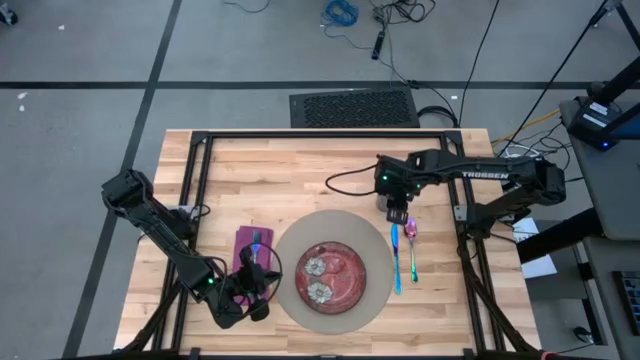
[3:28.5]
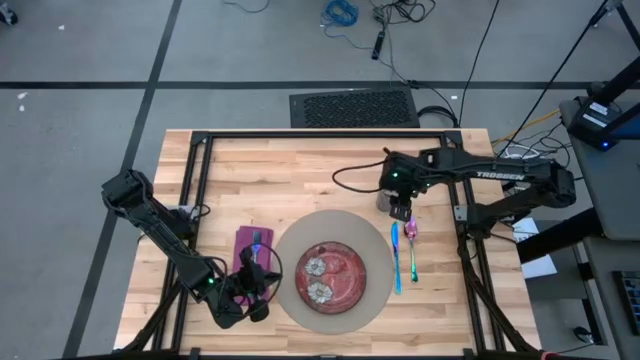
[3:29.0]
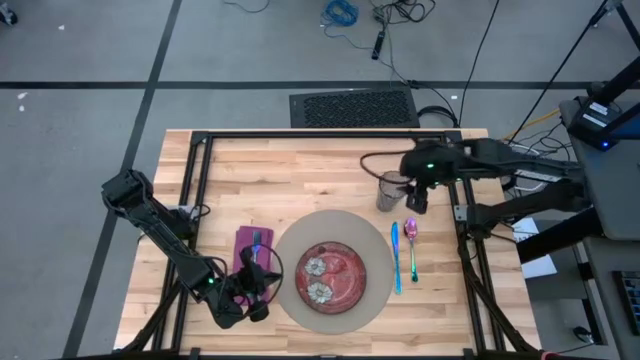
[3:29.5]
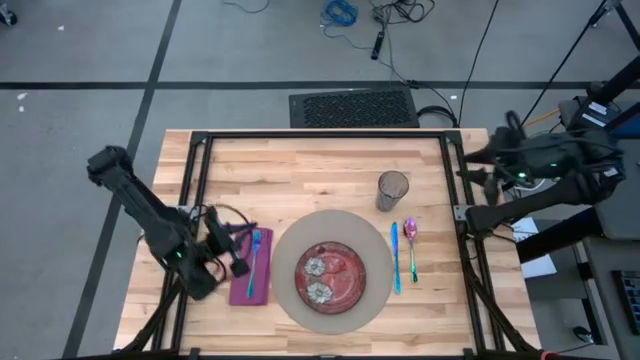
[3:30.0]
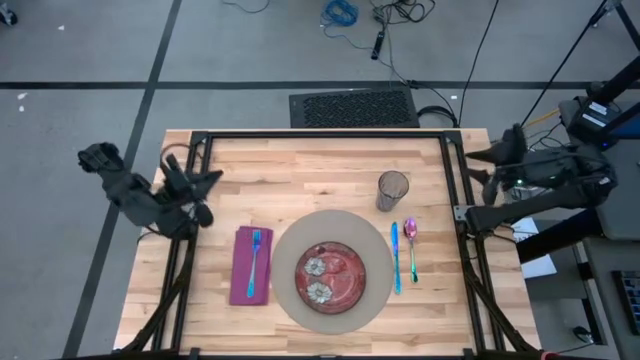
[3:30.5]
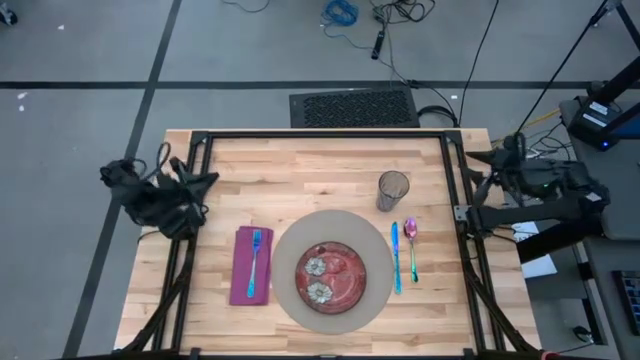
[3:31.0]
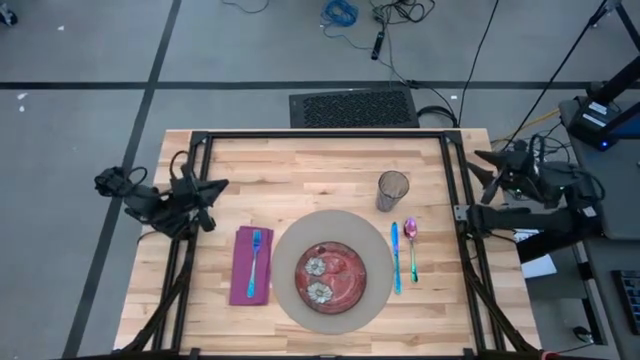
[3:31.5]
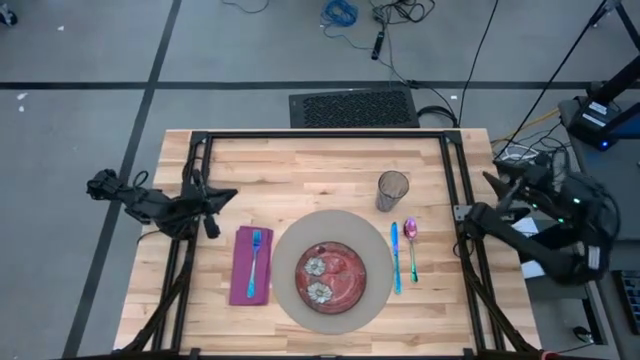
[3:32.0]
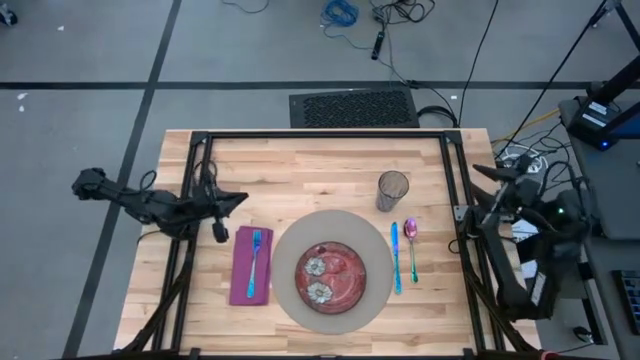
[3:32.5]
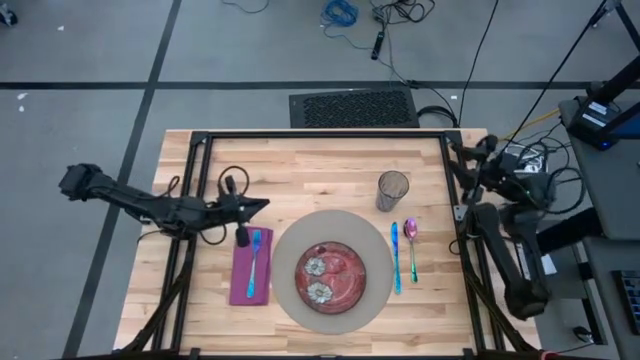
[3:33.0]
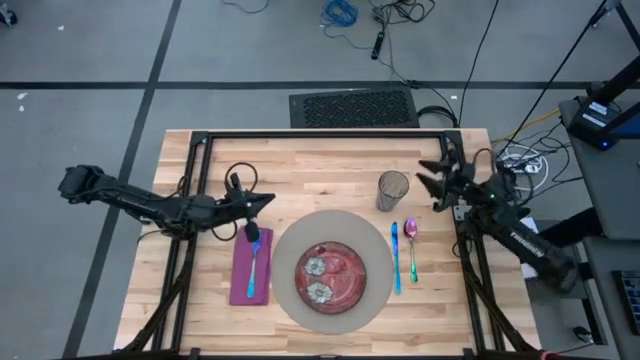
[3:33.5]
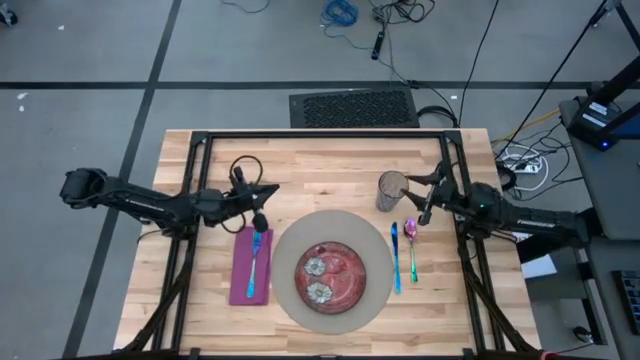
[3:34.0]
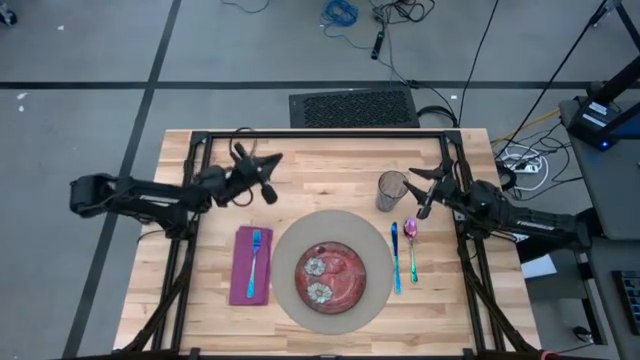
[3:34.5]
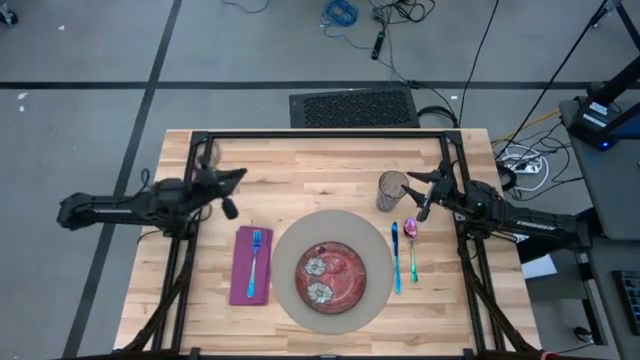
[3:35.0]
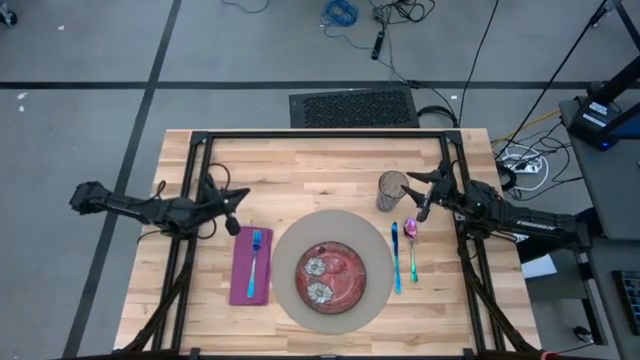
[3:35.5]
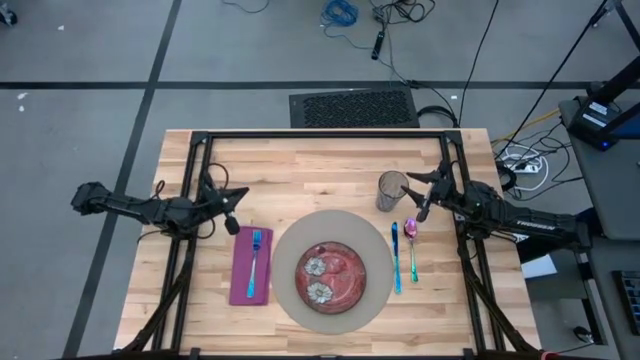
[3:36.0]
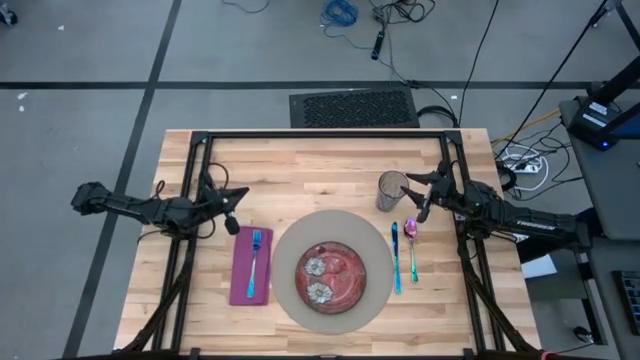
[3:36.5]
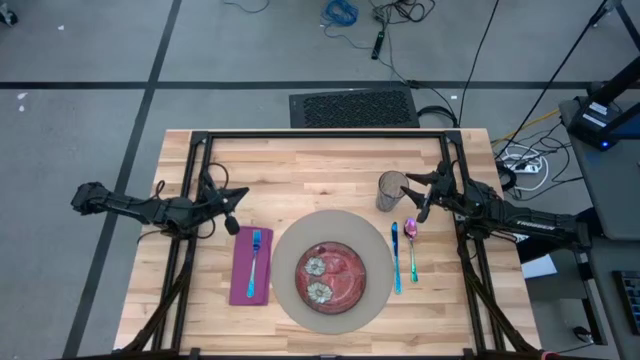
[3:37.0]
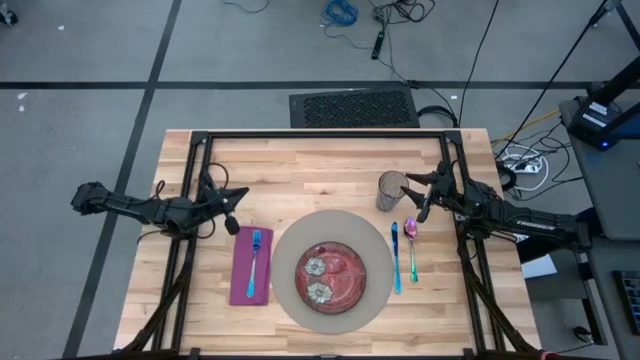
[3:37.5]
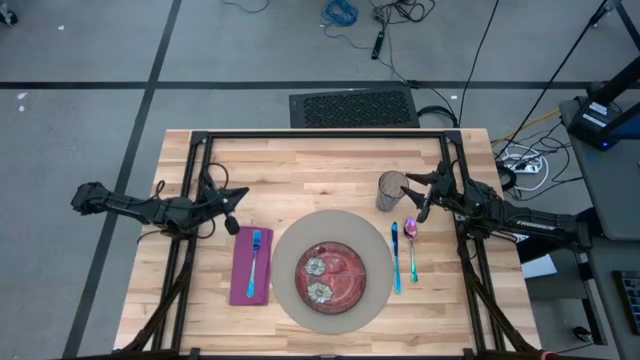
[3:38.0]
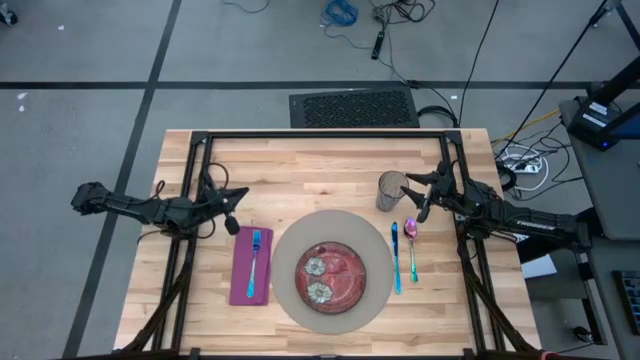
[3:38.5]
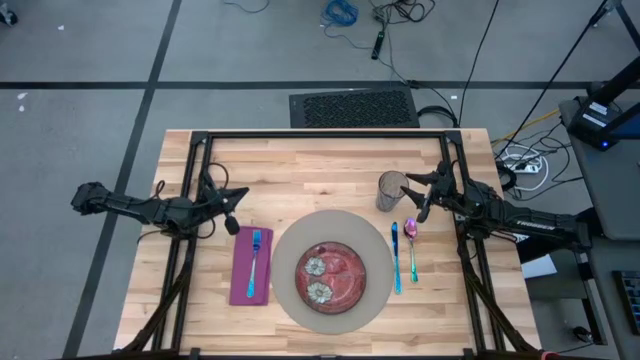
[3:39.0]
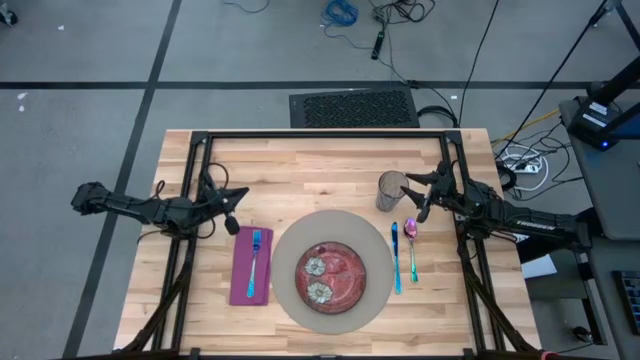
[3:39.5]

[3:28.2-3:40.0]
Task: Set table place
Return to Home Position

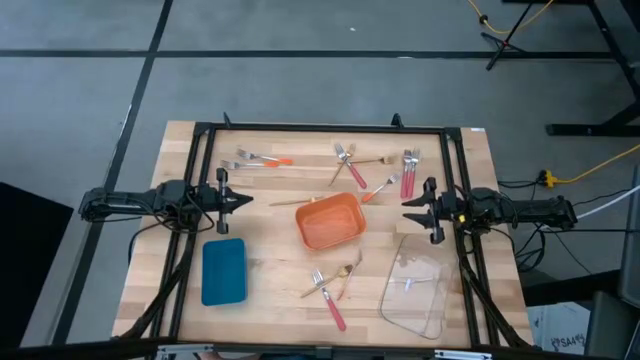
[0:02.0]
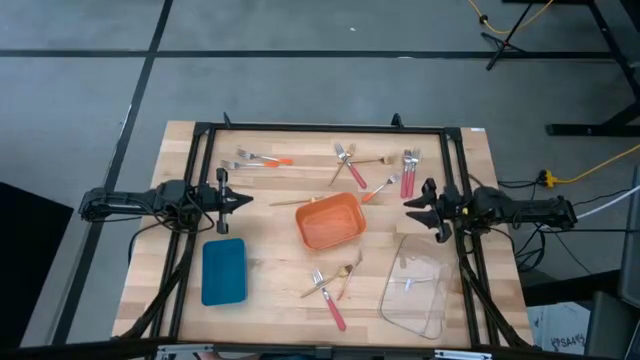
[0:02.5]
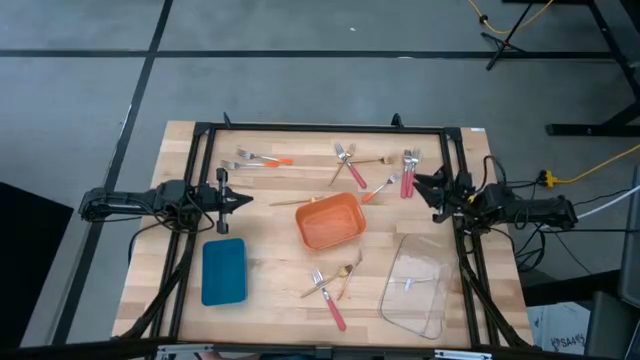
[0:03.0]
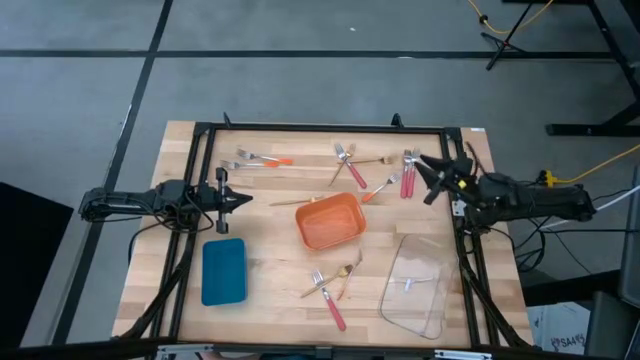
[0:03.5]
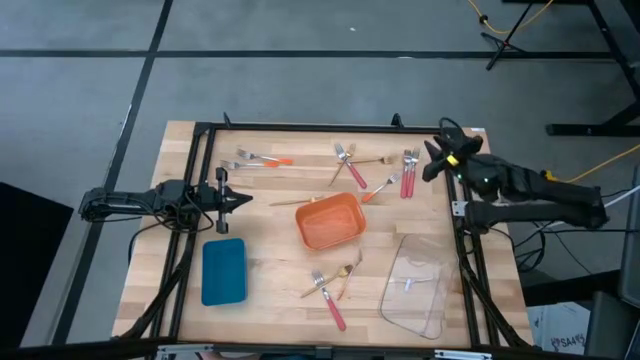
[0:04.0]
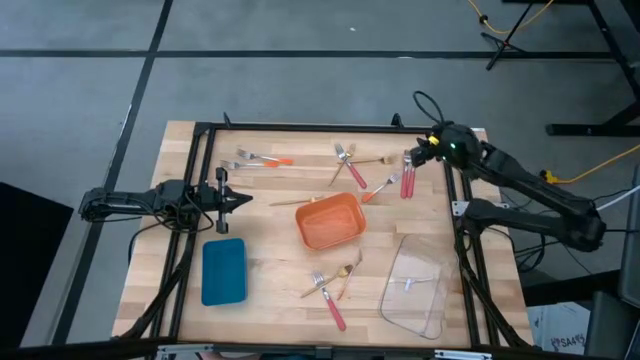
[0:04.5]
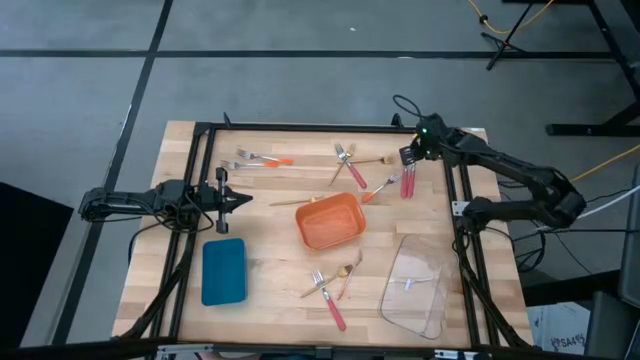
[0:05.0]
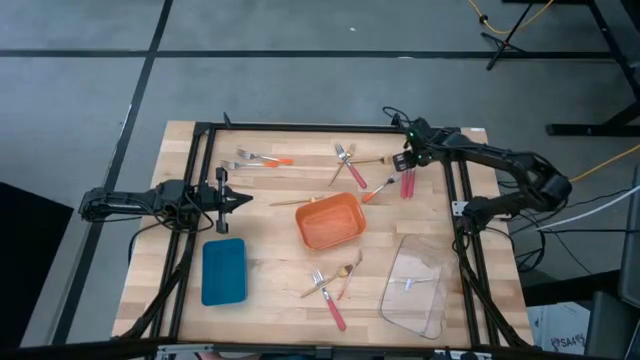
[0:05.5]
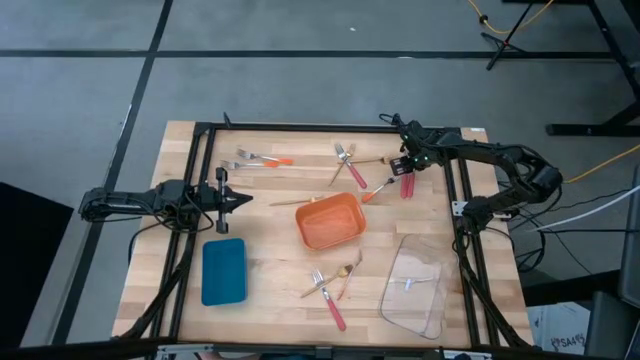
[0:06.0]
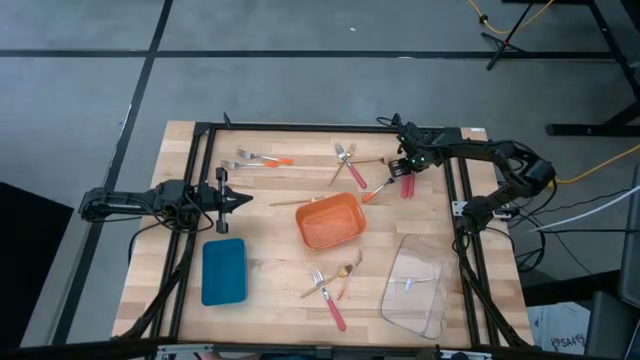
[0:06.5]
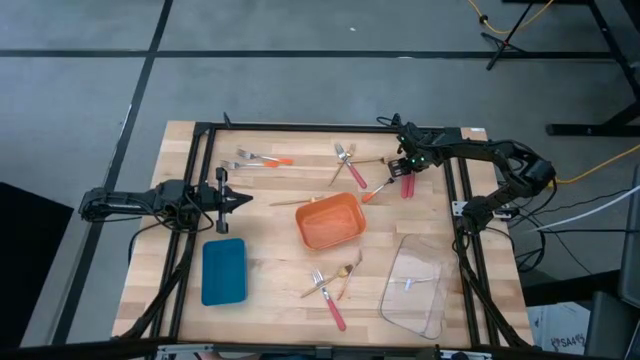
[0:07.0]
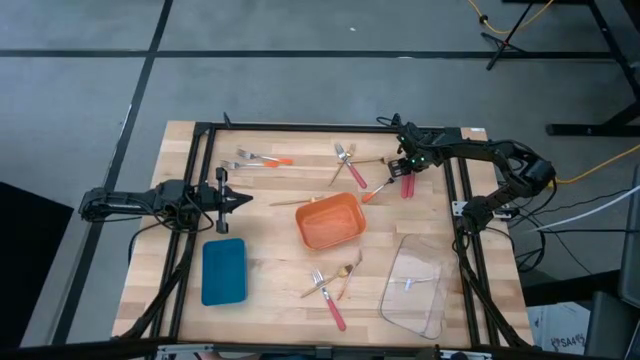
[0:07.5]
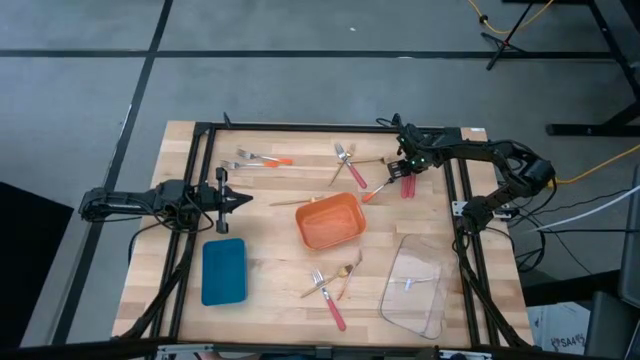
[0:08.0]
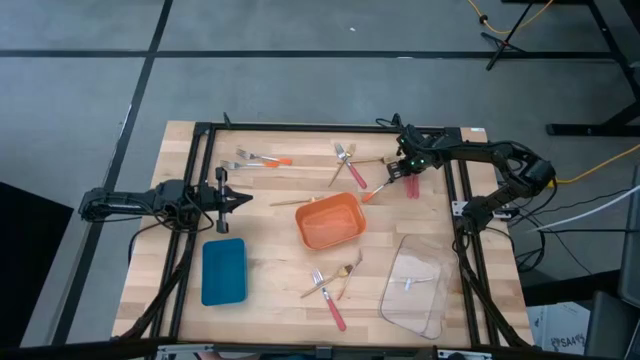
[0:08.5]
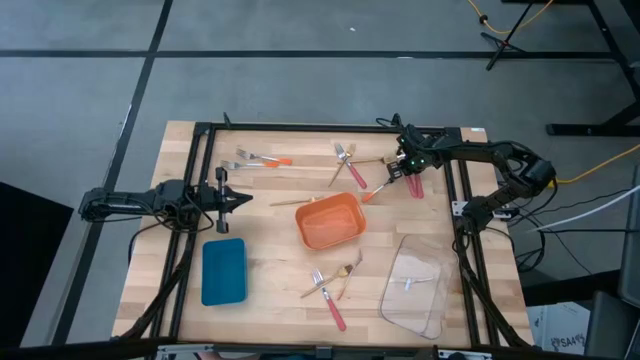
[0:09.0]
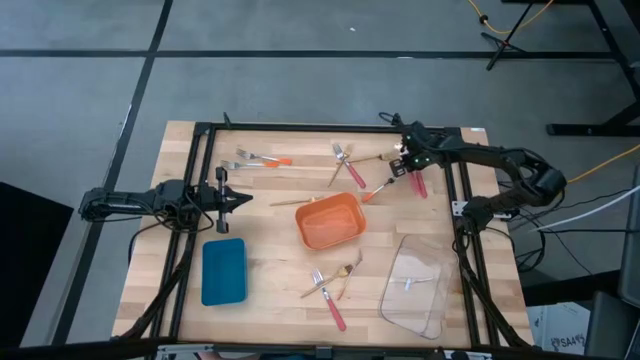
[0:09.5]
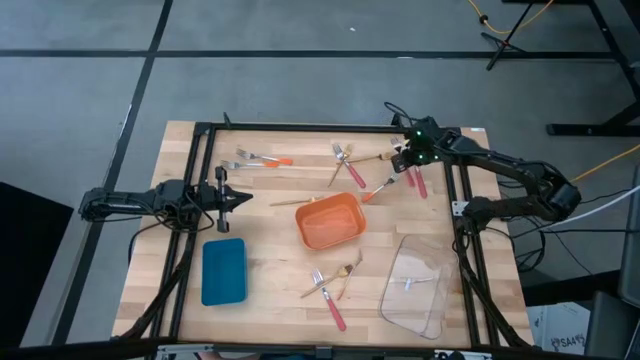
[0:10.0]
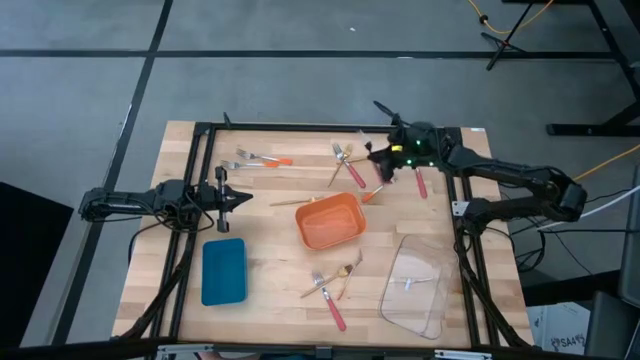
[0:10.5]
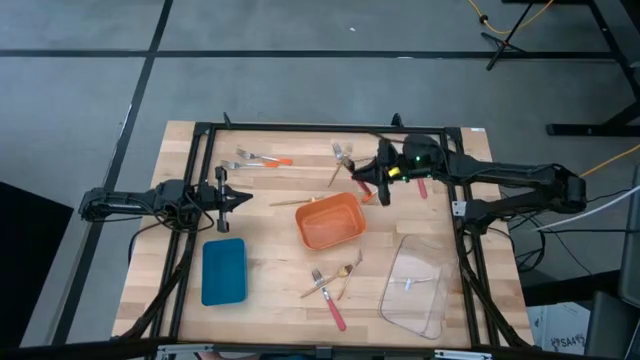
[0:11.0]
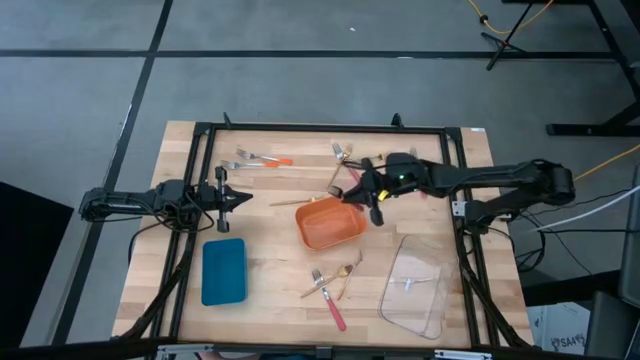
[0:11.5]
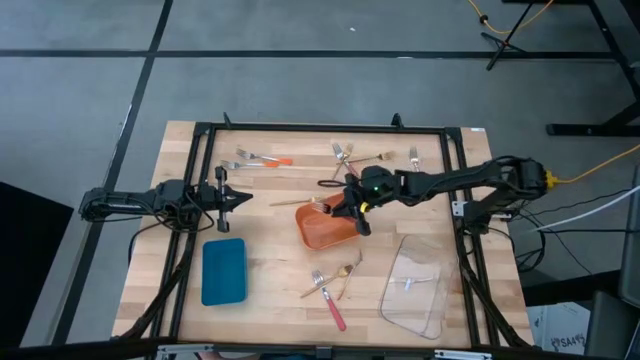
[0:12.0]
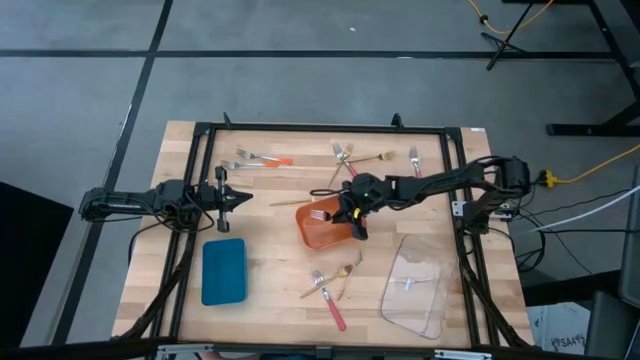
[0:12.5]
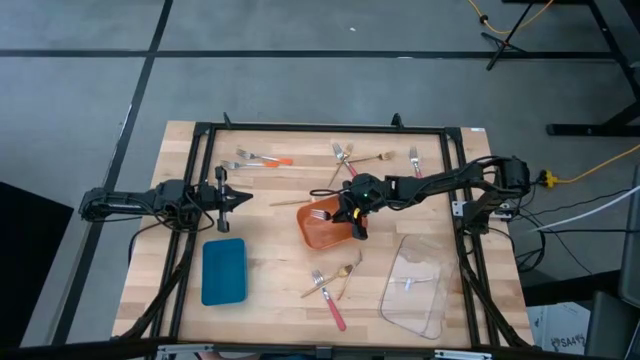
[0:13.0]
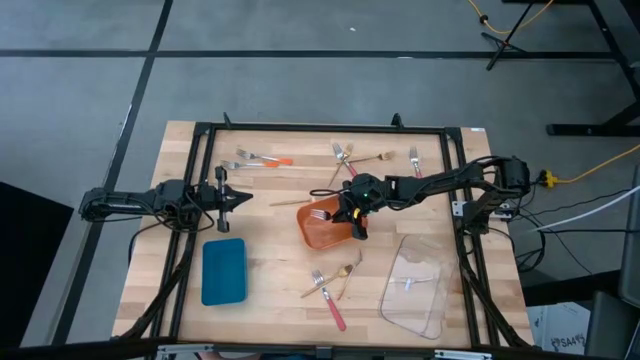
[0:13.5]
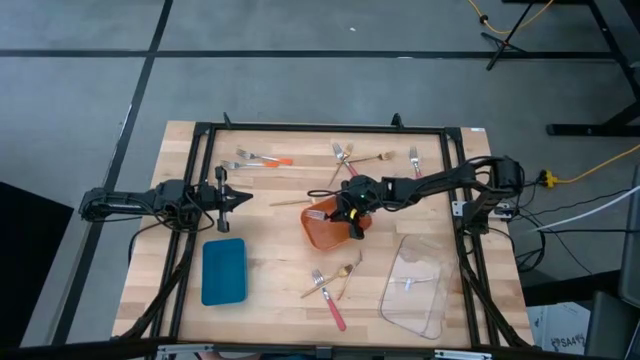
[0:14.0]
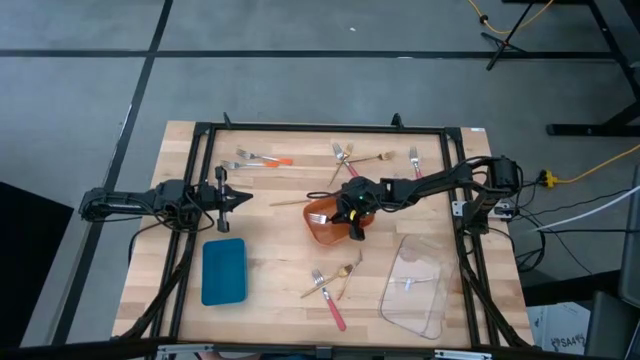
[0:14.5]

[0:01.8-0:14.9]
Task: Sort silverware by color (type)
Put the pink fork into the orange bin
